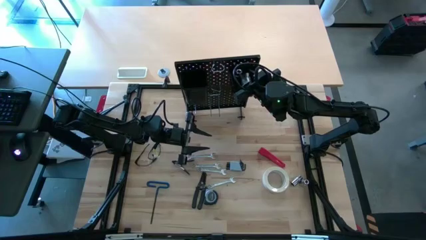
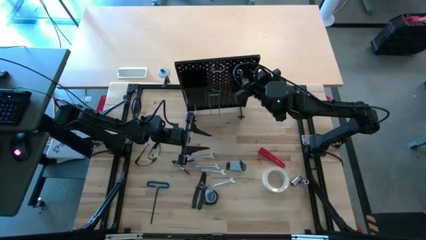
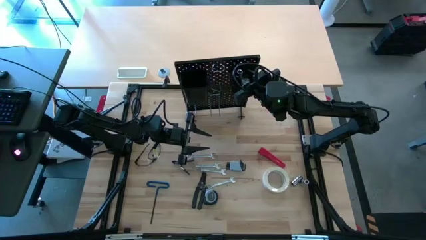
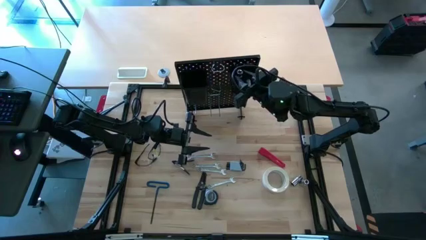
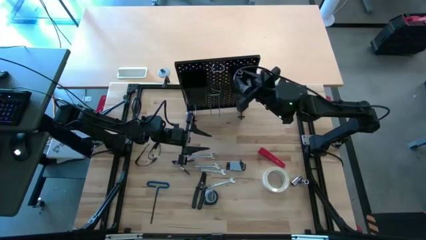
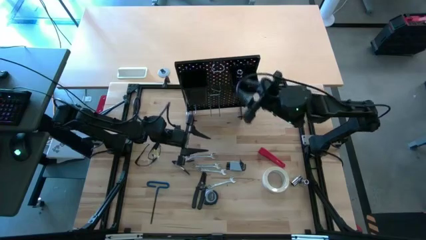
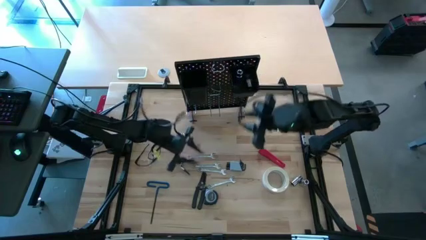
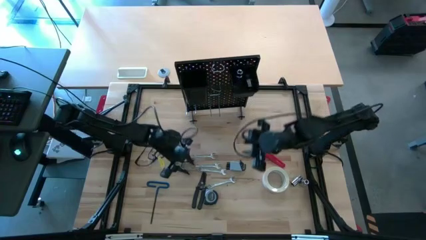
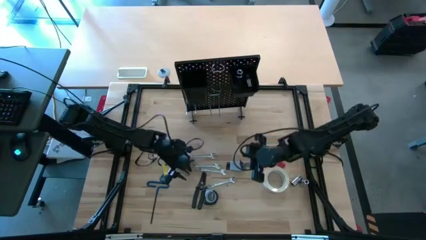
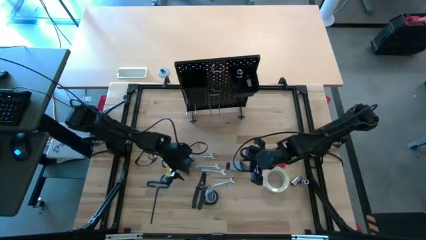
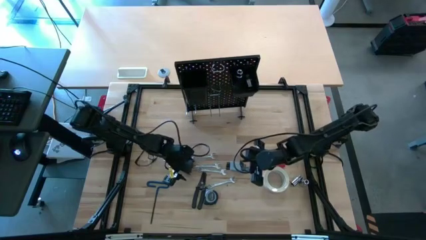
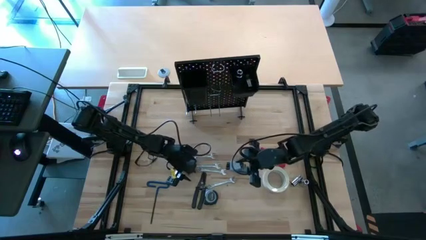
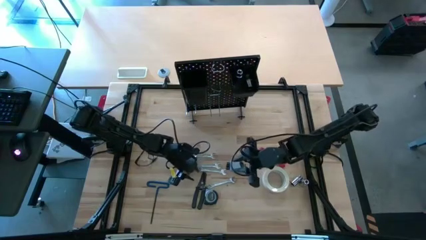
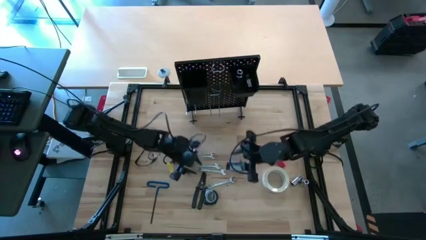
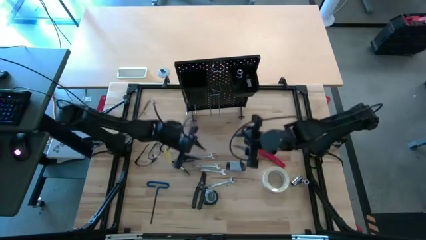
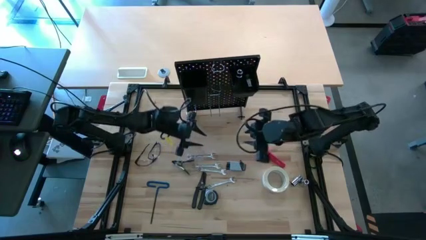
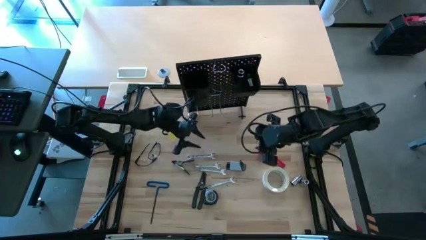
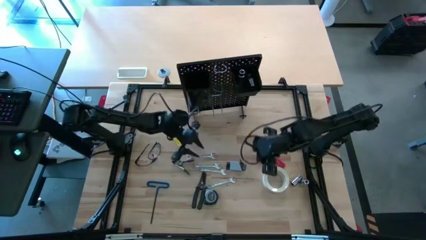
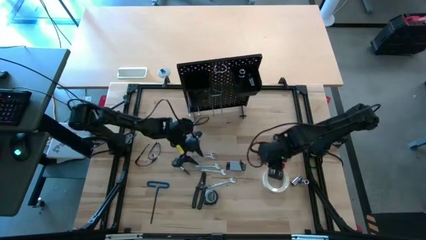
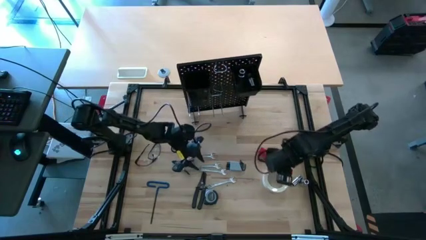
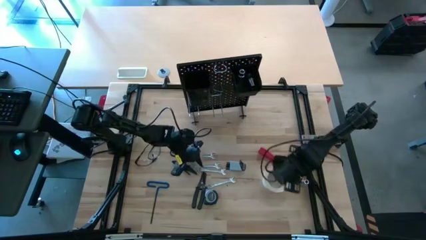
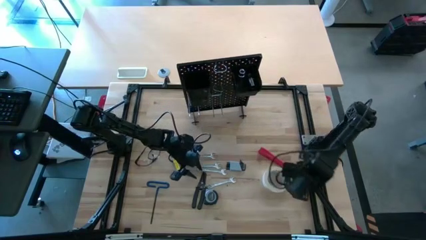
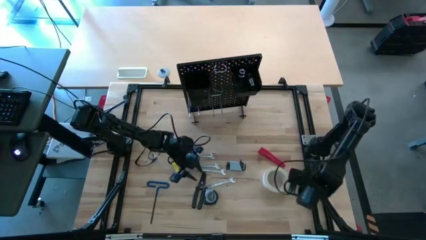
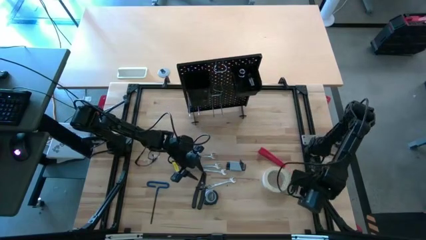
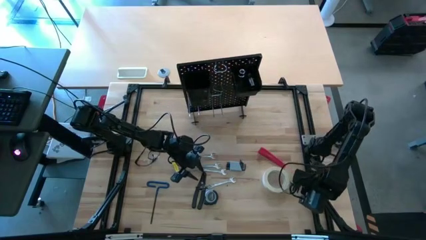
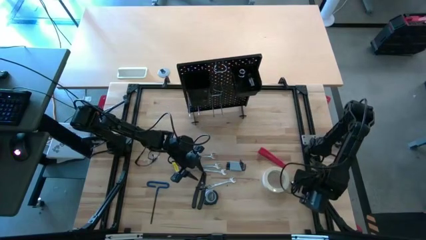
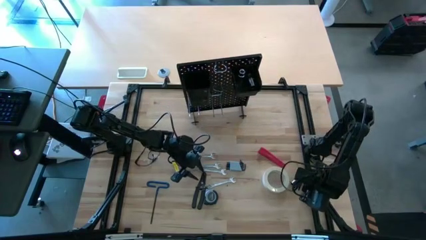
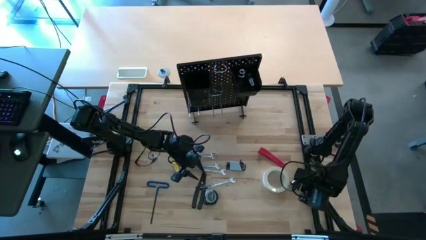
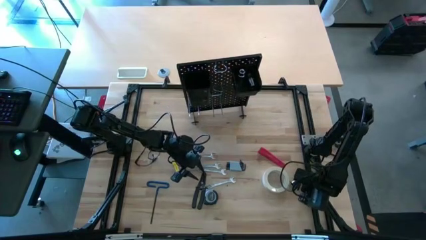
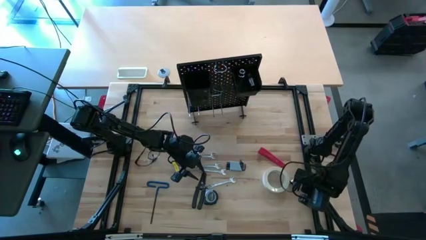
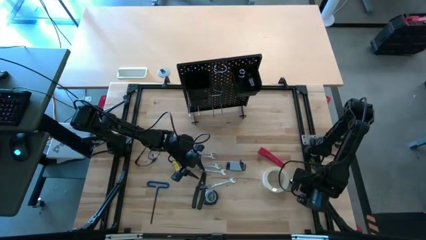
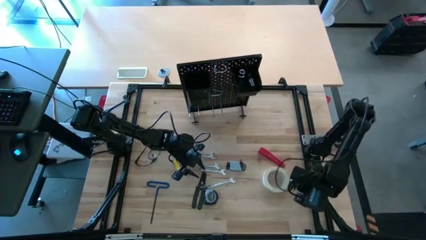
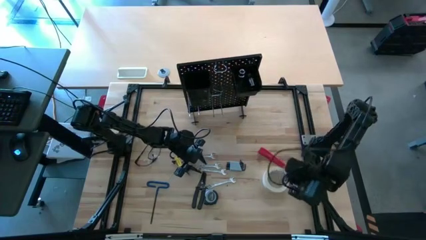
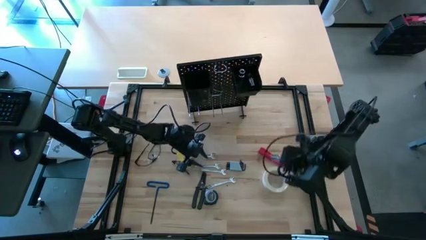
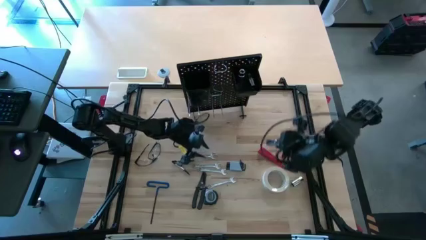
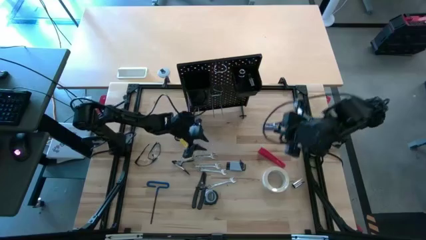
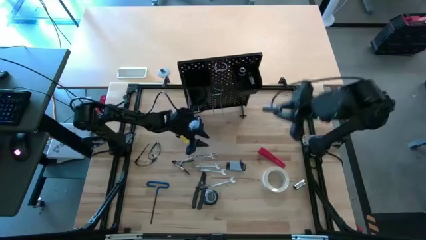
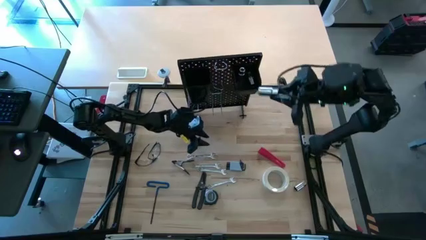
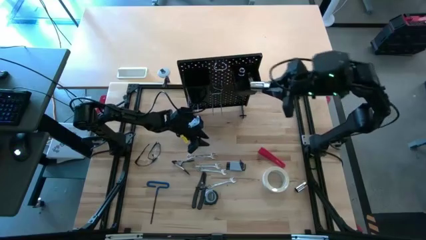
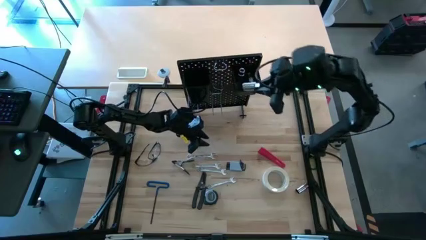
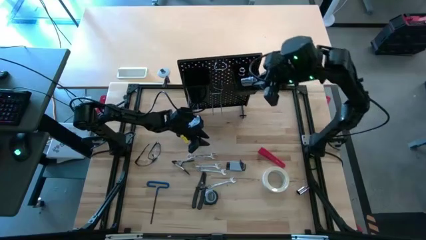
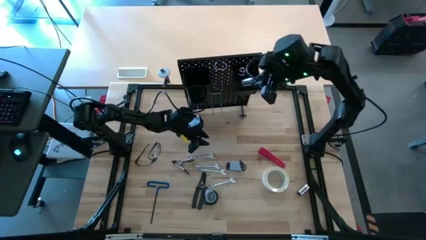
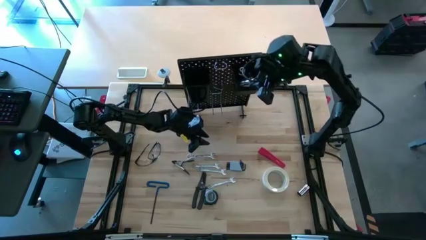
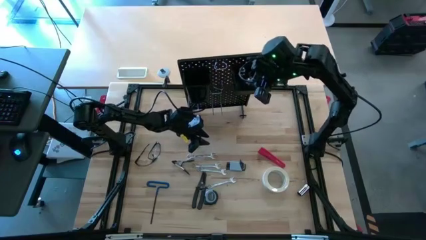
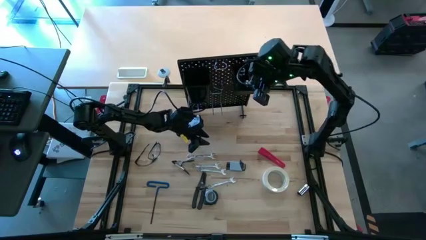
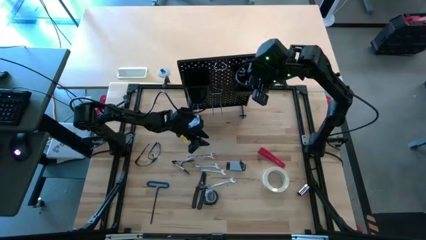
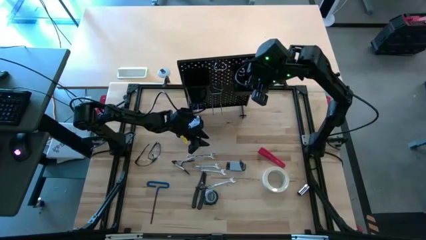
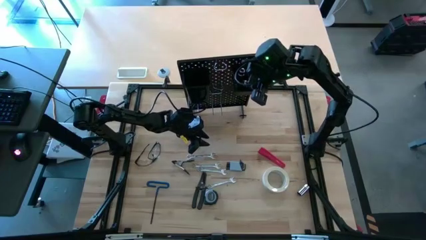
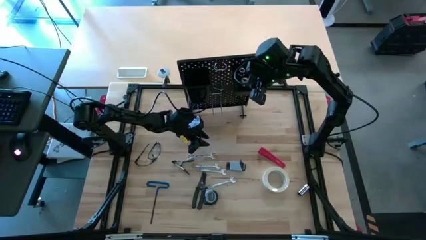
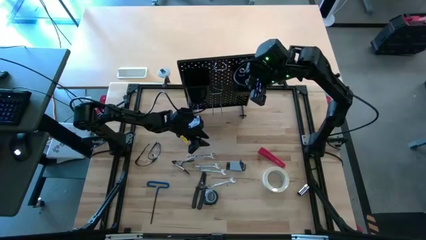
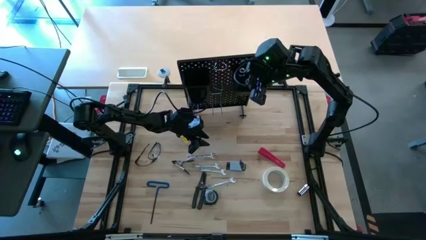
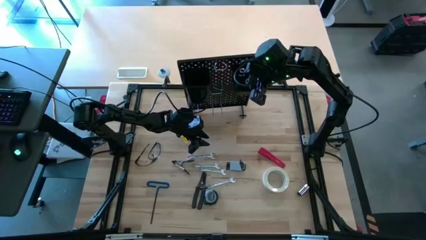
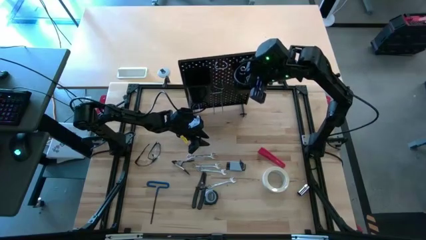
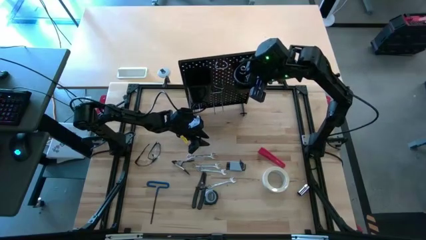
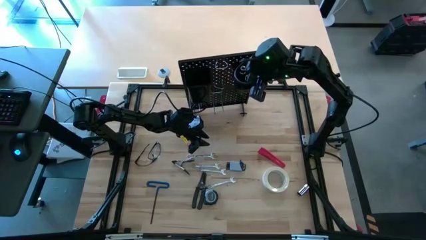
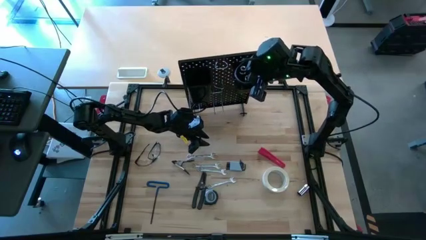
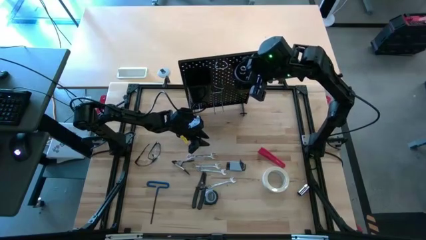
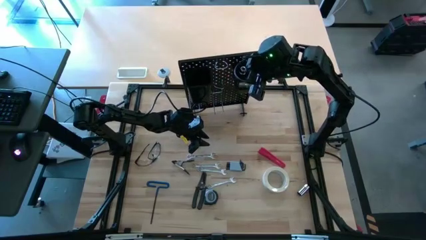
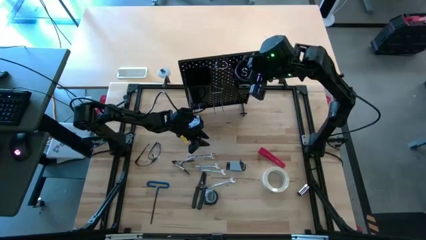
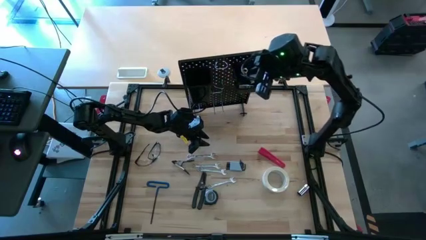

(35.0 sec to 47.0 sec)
Task: Hang tools onto peg board
Put the right silver socket into the black bin on the pegboard

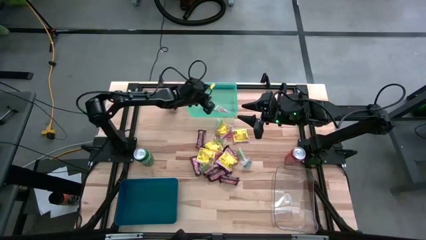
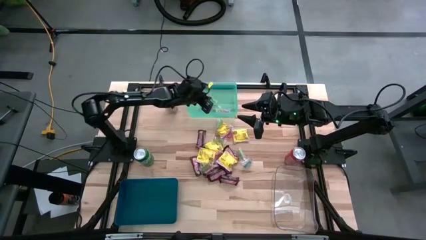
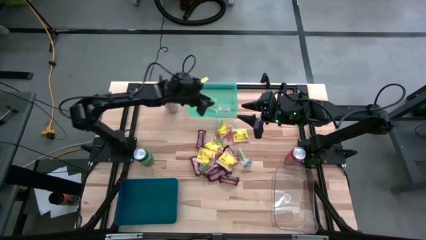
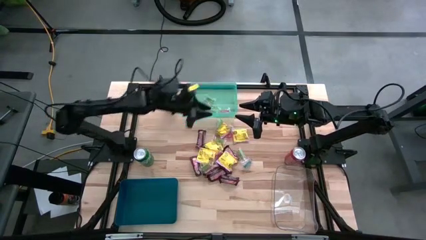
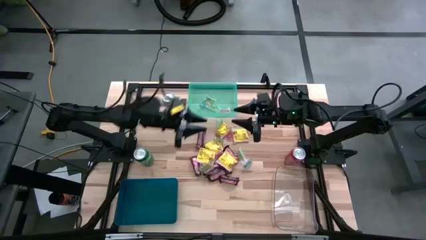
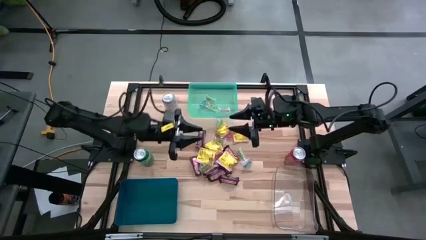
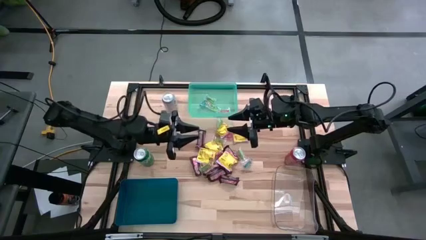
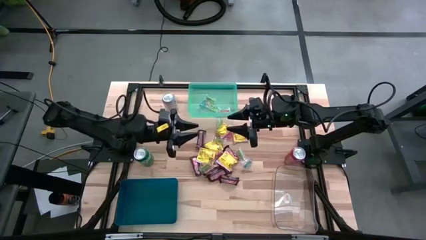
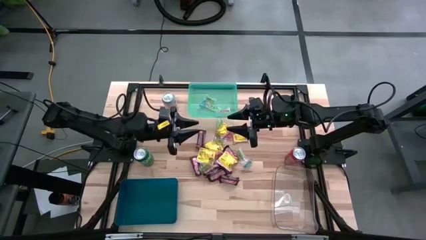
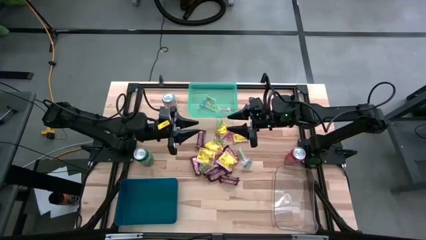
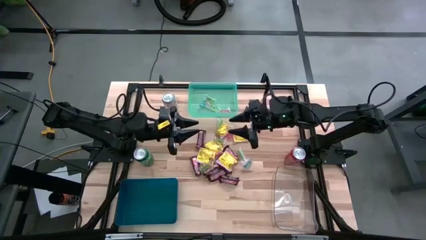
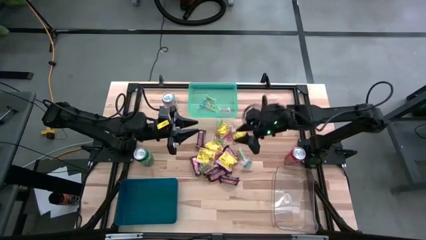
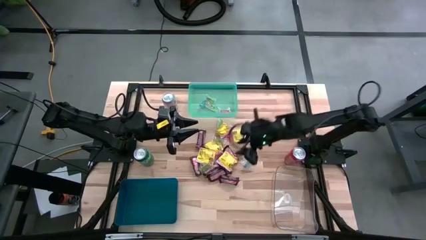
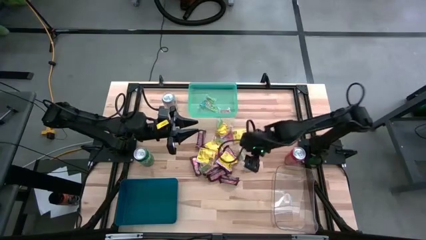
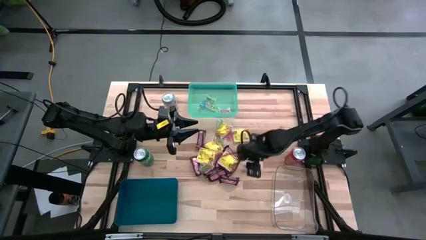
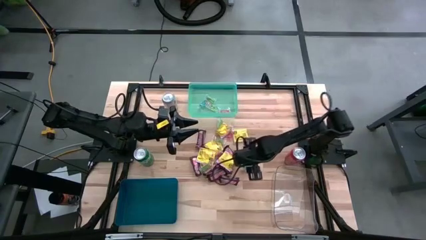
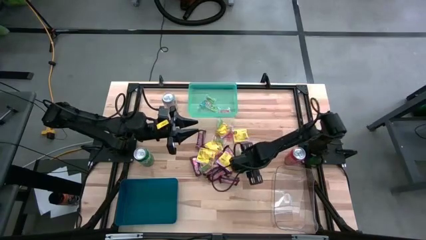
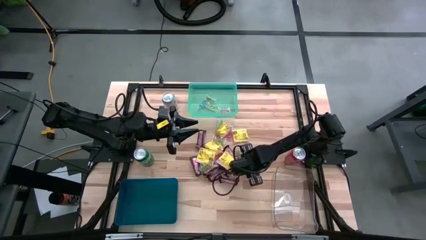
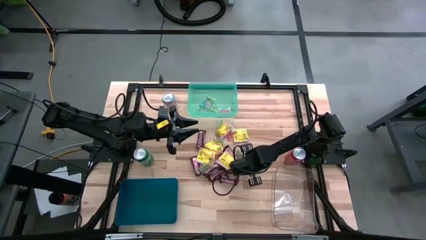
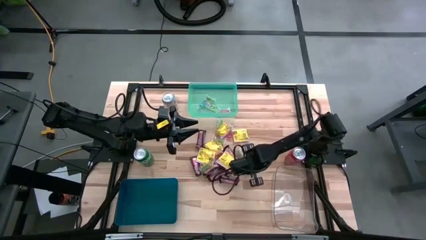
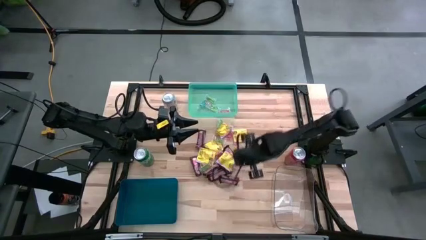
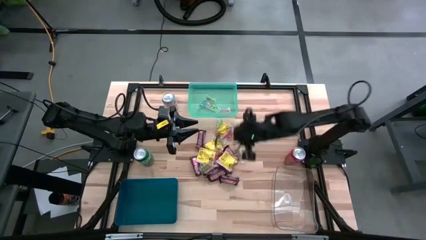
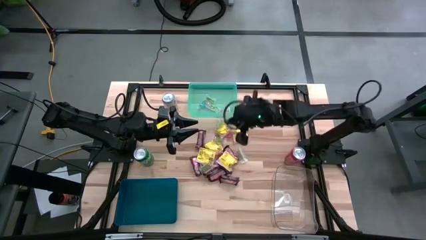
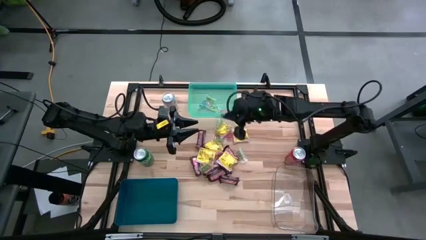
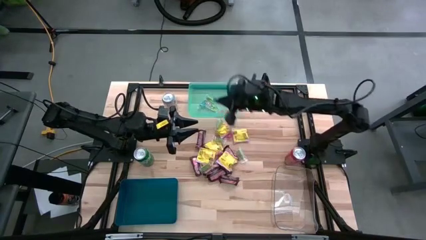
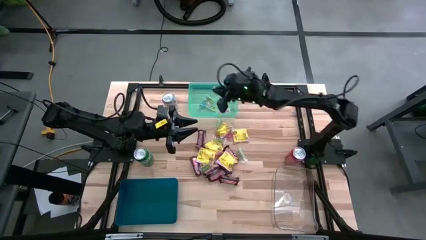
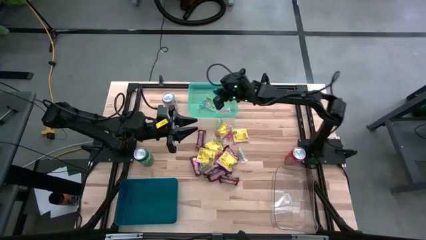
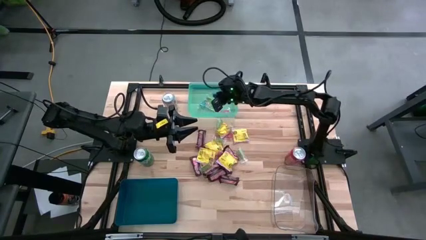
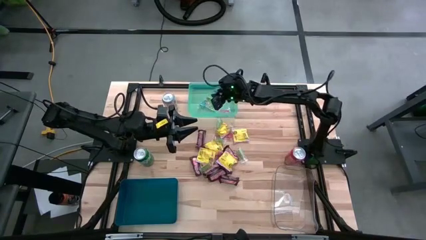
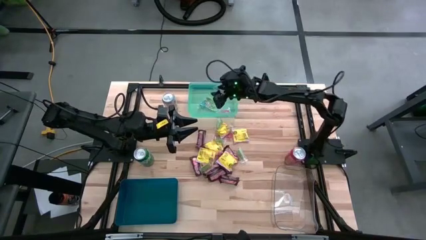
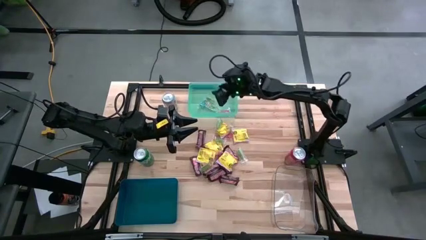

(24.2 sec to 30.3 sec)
Task: Sort candy
Put blue gummy into the light blue bin
